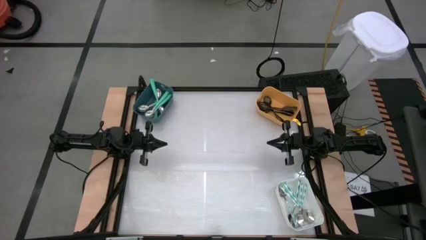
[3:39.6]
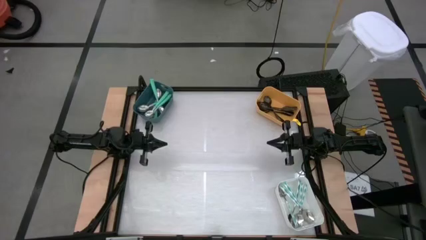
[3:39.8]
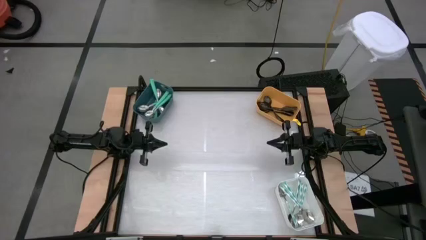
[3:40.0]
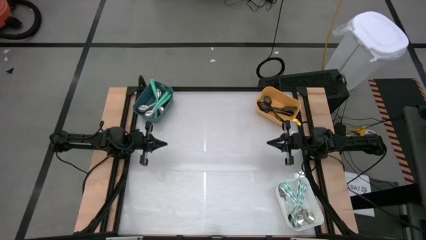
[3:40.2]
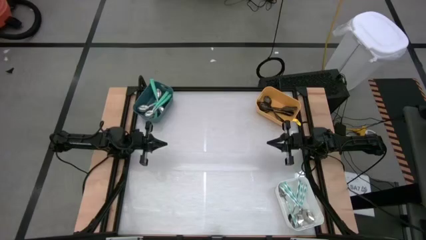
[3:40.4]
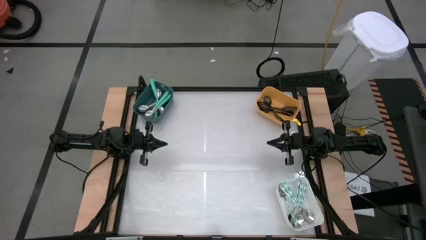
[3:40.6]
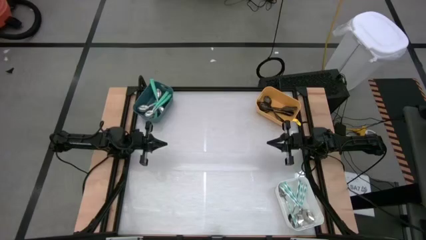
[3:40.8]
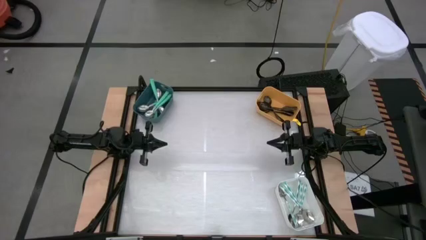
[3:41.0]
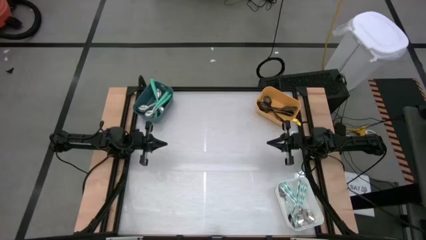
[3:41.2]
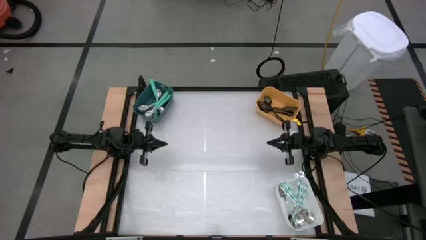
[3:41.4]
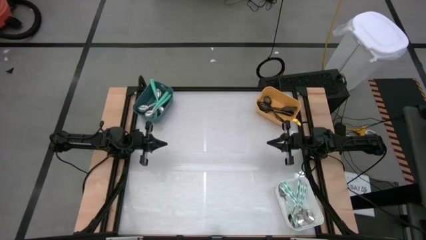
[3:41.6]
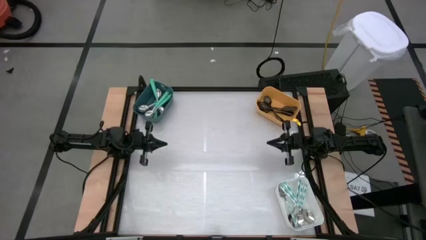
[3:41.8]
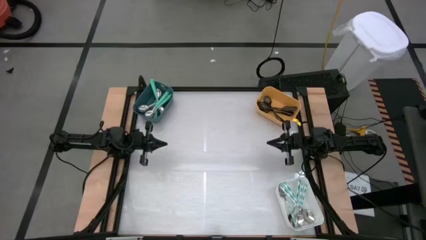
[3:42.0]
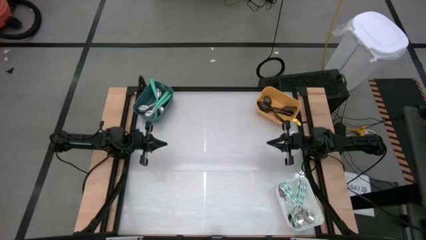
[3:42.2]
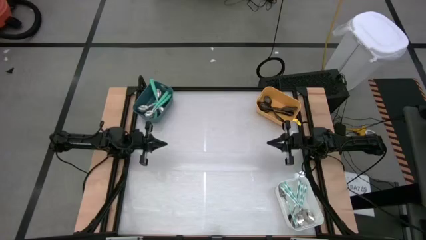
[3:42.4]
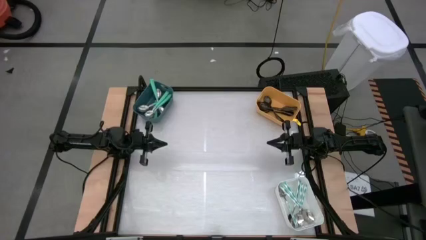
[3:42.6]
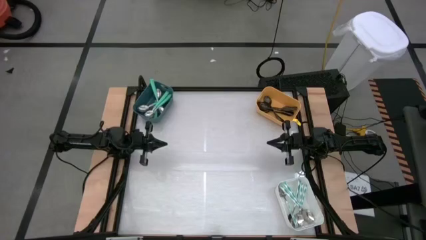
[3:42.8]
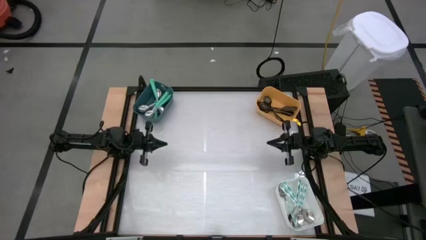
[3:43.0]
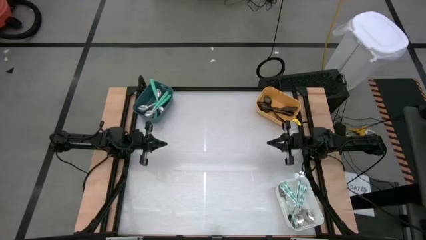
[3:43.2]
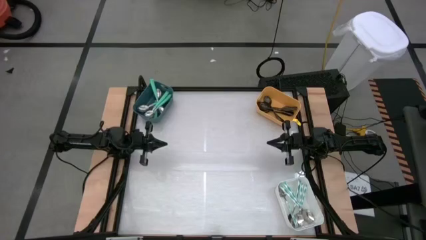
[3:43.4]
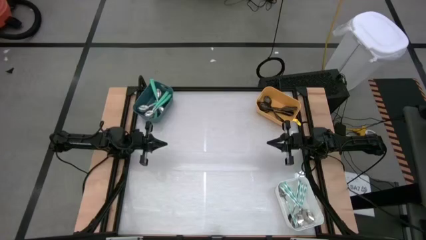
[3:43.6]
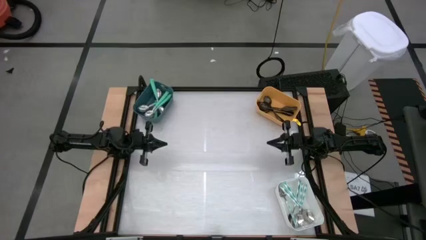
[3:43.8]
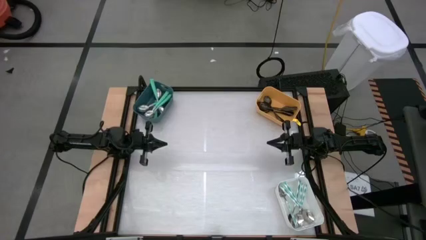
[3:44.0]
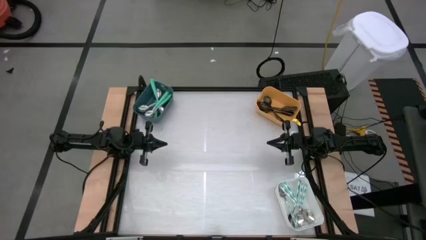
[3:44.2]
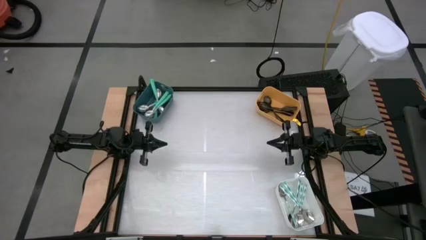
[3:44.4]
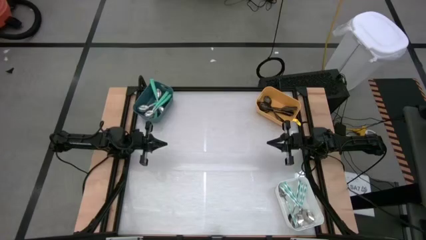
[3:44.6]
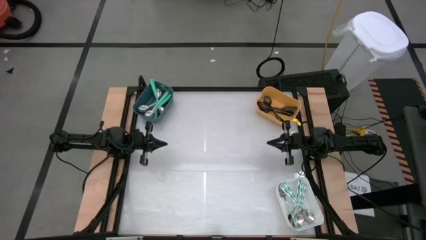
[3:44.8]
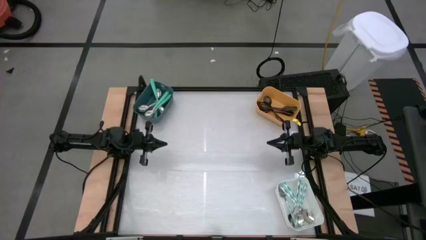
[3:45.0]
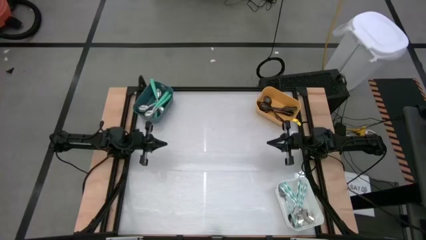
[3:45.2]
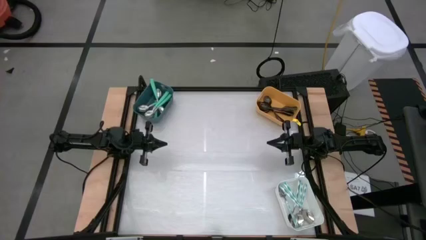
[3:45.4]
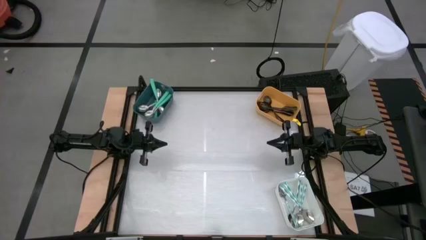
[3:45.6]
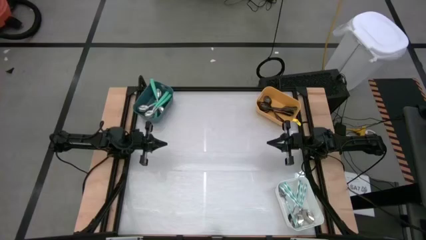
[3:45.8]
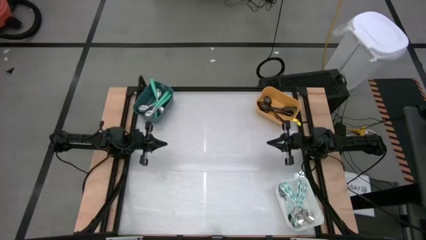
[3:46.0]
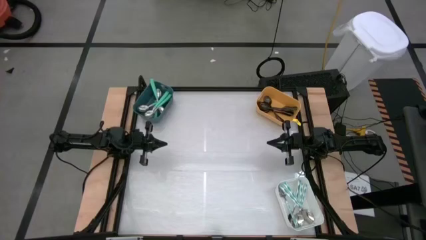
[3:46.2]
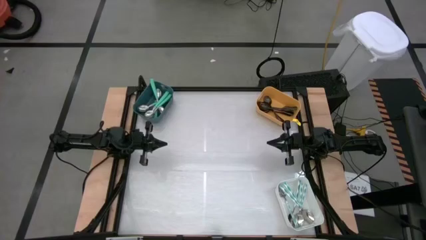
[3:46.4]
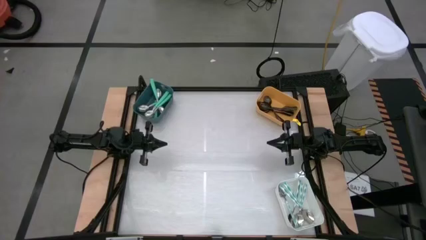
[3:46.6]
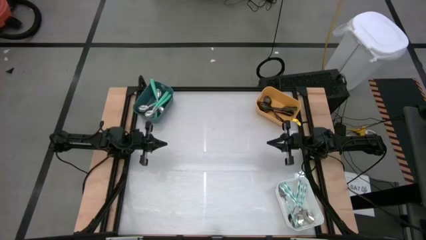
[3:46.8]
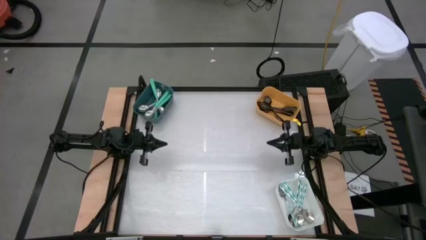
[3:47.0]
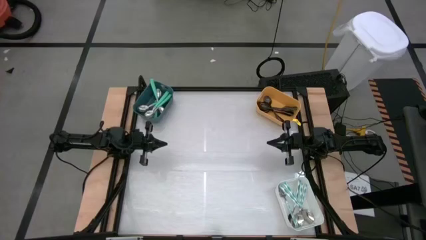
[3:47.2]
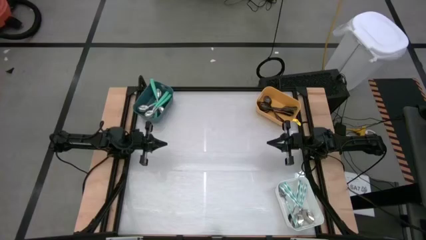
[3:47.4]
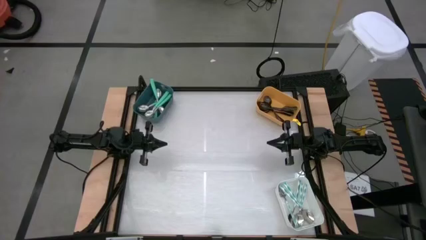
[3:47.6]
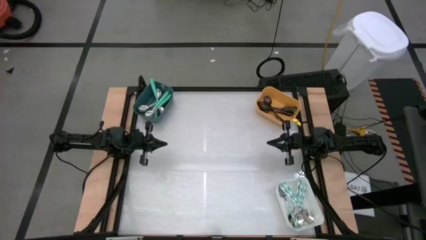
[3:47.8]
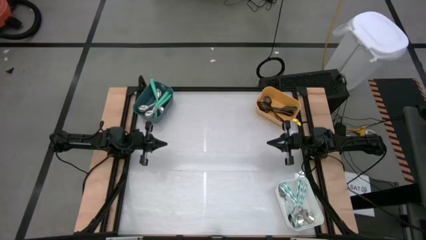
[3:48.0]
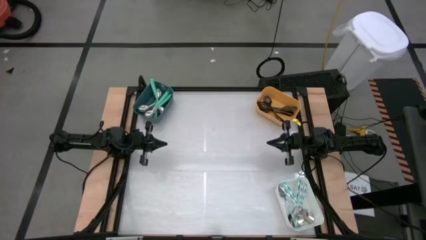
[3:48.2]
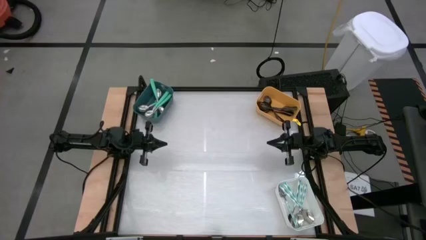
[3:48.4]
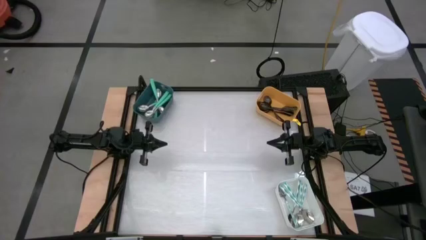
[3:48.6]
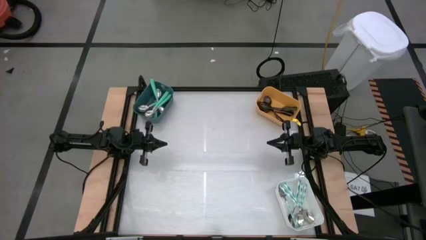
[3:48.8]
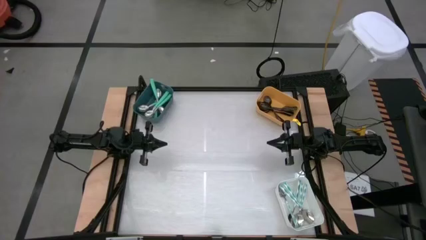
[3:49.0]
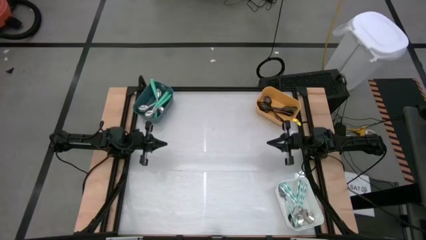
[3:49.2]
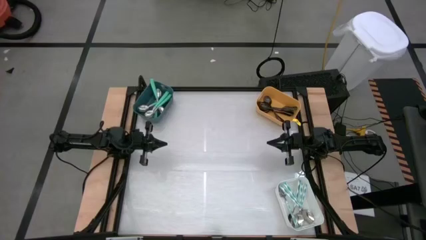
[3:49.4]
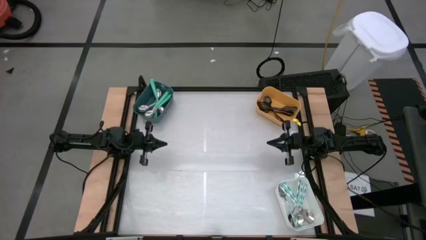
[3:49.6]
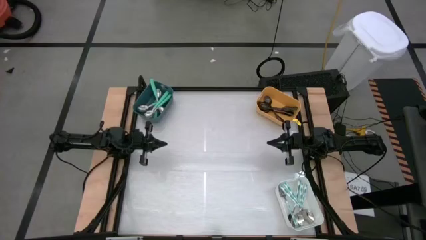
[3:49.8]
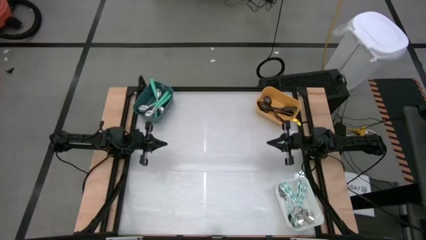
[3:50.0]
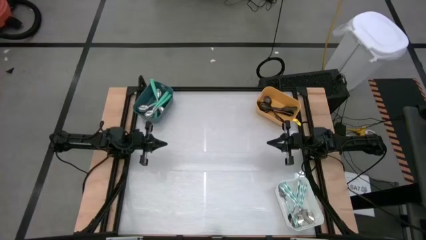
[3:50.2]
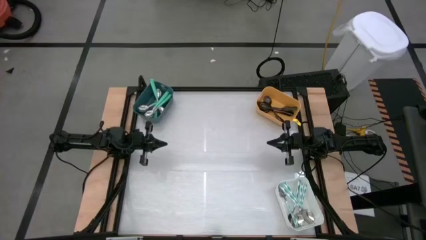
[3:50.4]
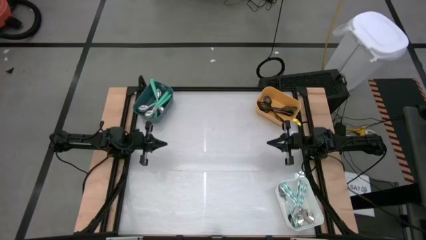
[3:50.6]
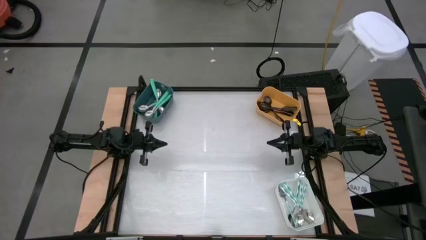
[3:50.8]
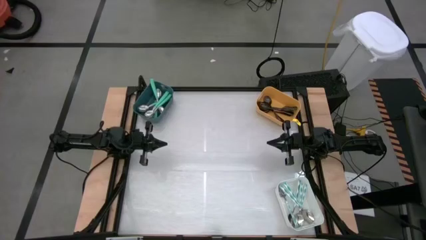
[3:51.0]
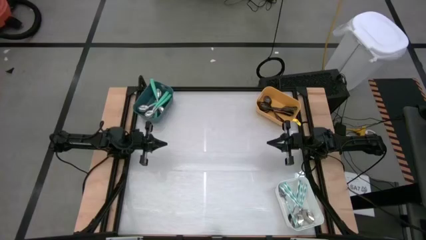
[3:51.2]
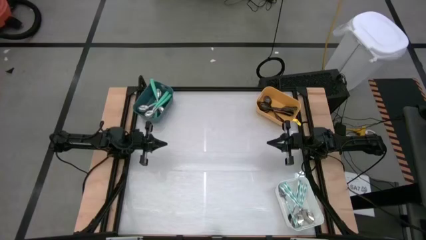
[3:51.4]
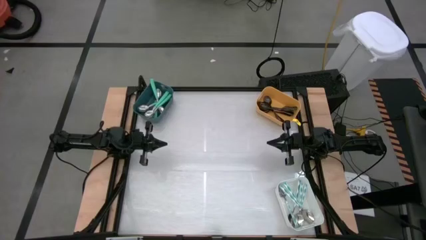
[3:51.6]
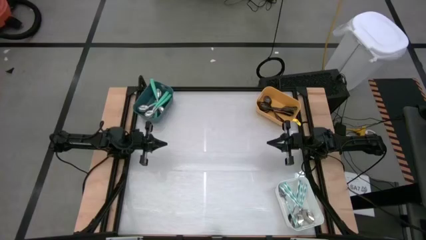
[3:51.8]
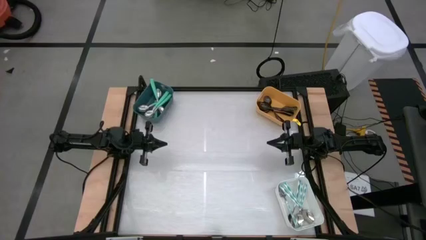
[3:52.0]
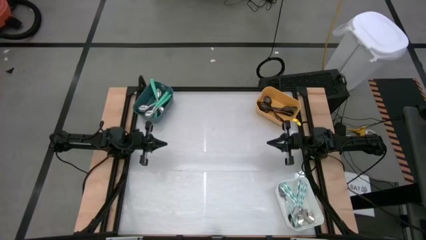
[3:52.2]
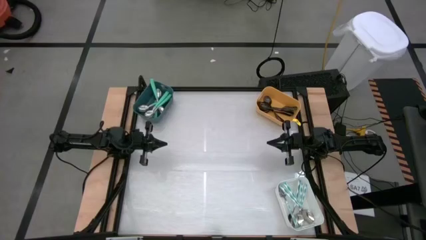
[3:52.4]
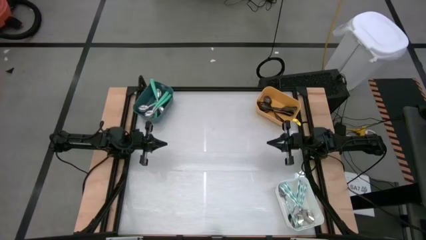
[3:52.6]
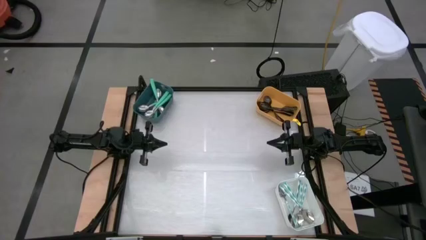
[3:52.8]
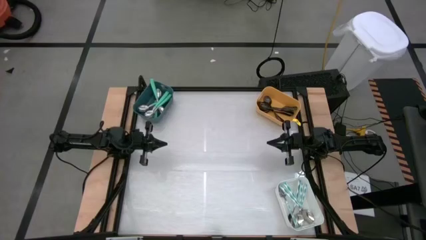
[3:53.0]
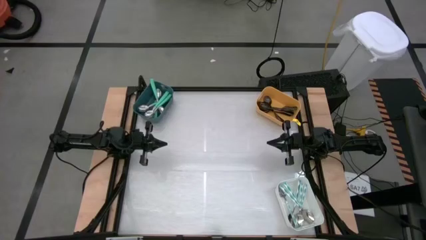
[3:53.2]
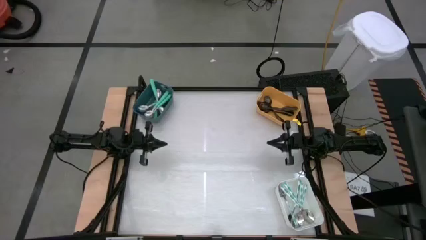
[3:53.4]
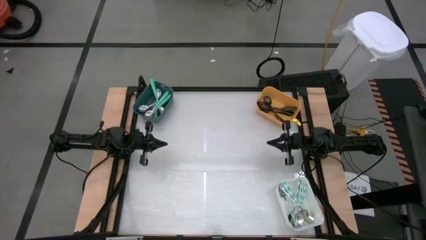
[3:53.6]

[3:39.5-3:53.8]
Task: Sort silverware by color (type)
Return to Home Position

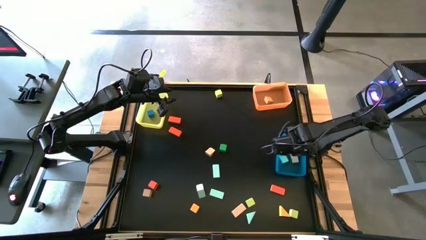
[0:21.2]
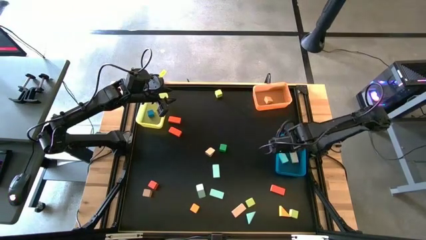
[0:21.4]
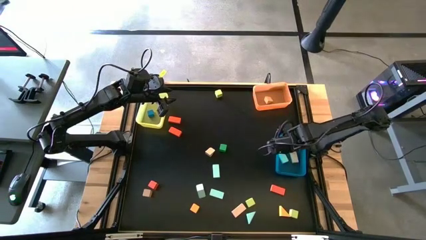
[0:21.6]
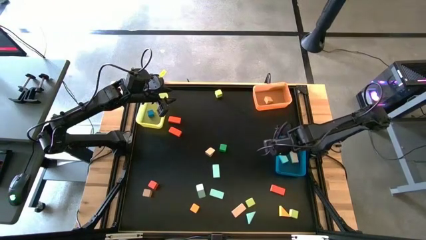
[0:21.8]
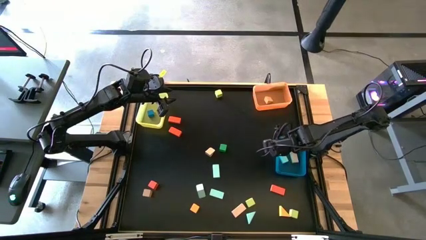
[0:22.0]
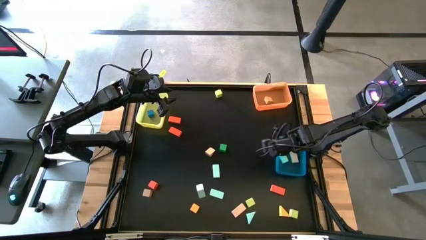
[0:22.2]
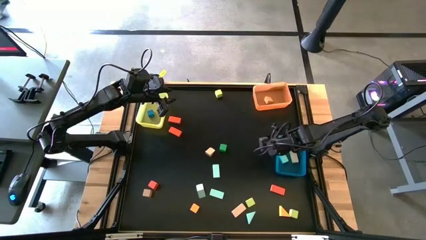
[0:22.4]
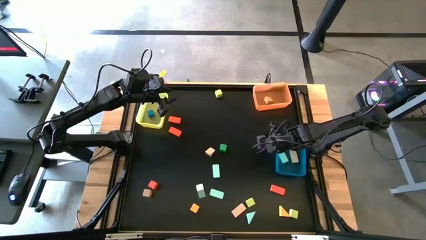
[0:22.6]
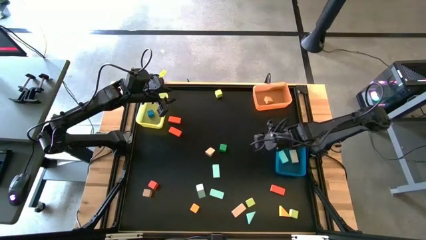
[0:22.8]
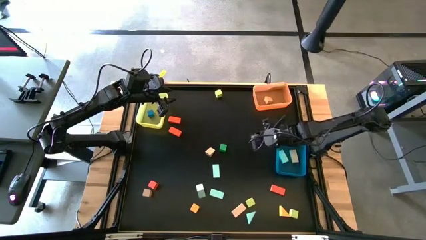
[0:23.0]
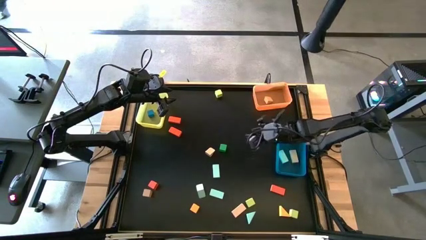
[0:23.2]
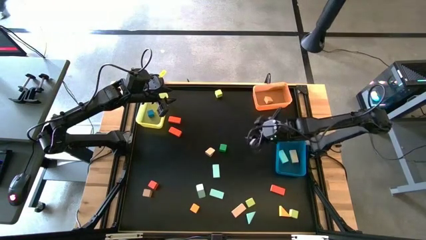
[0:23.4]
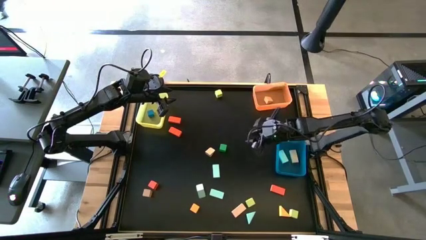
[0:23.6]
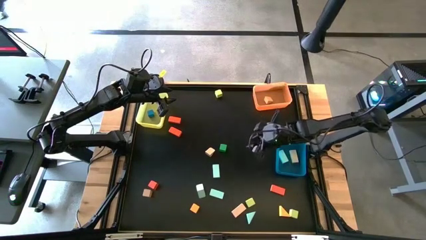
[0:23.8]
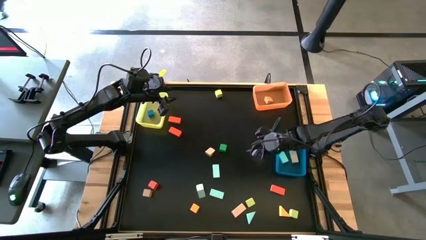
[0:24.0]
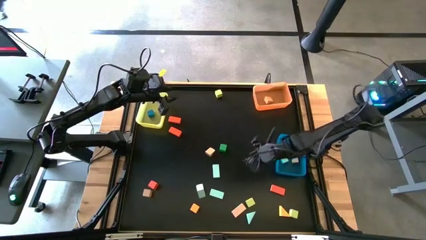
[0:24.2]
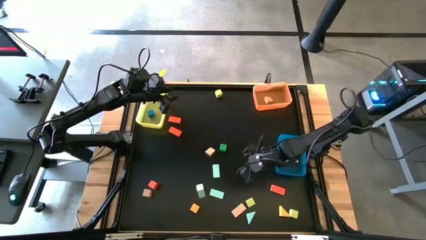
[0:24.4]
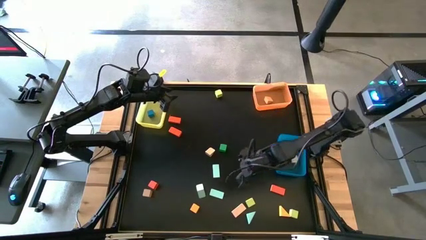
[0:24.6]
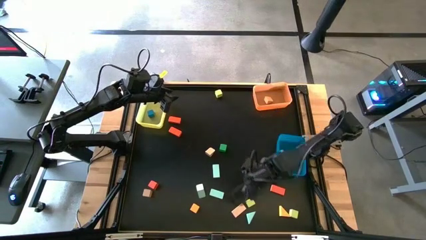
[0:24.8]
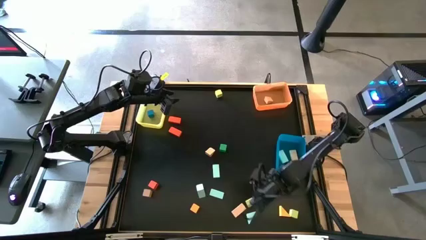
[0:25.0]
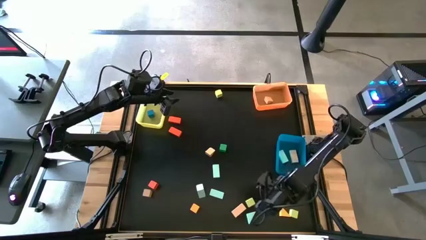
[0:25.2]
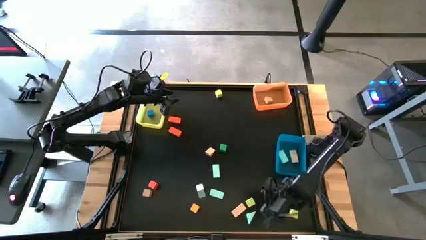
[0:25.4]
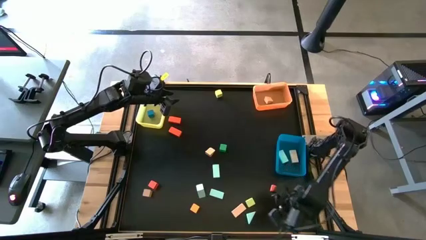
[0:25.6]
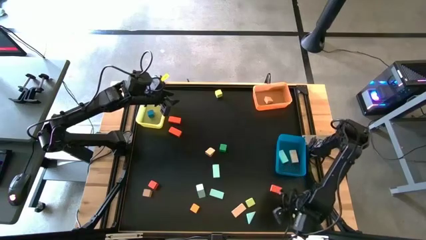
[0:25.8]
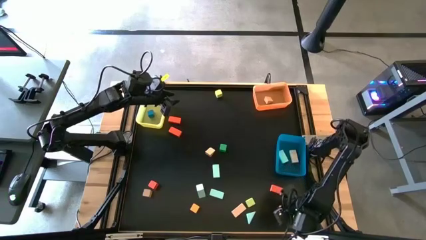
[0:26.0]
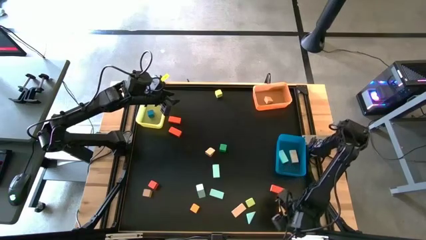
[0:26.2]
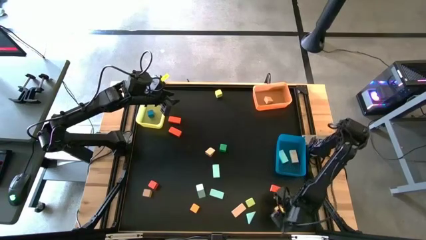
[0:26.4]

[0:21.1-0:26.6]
Task: Sort blocks by size
Put the yellow triangle block into the orange bin
